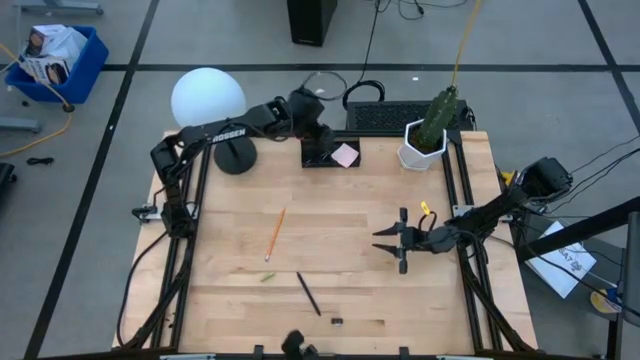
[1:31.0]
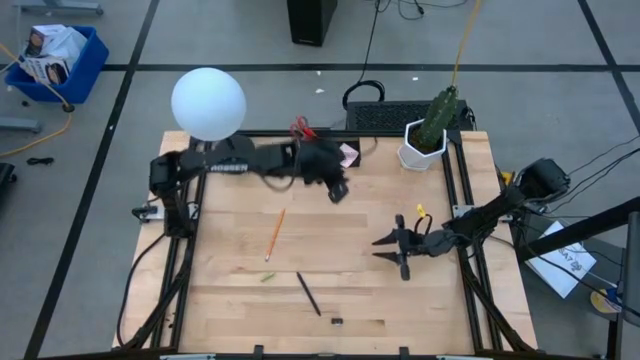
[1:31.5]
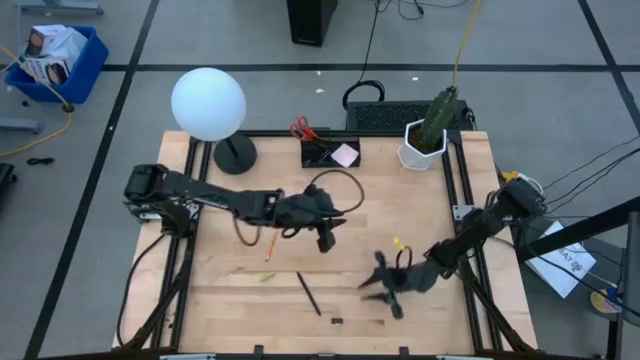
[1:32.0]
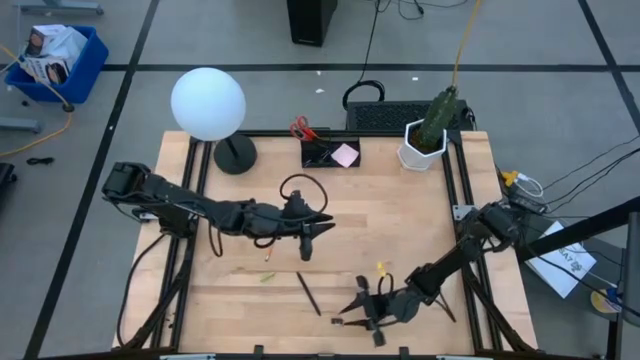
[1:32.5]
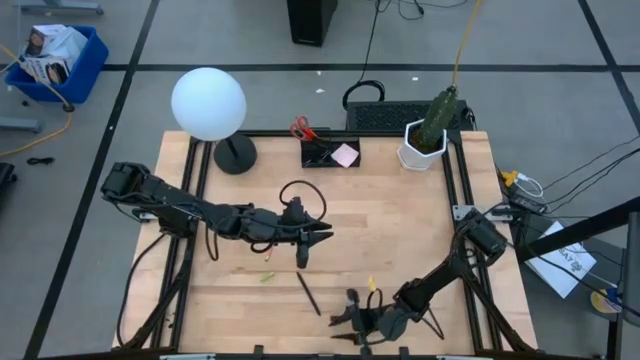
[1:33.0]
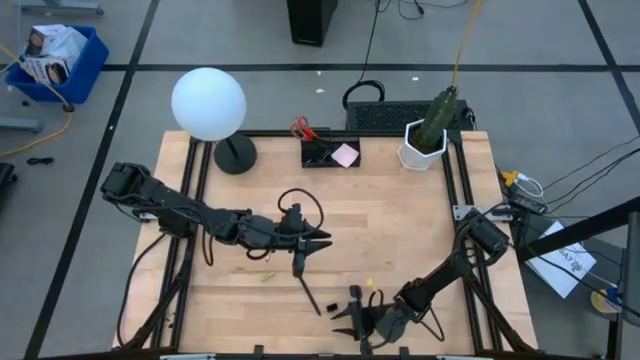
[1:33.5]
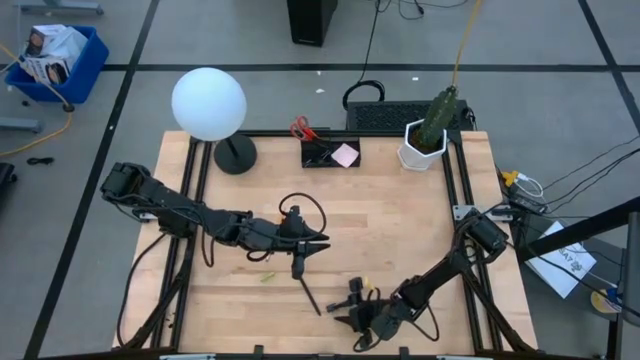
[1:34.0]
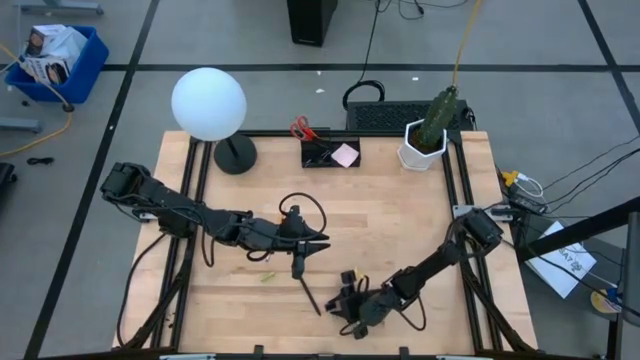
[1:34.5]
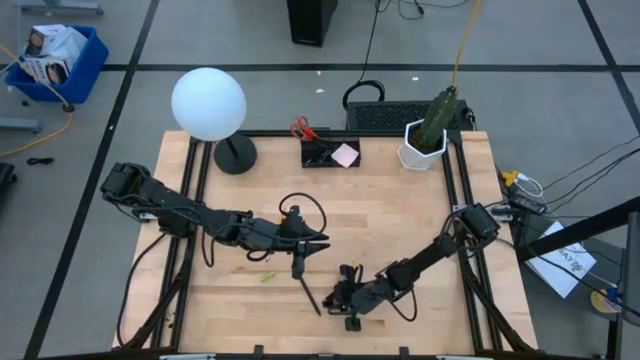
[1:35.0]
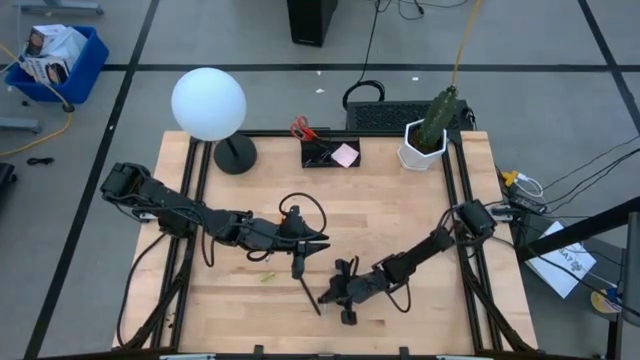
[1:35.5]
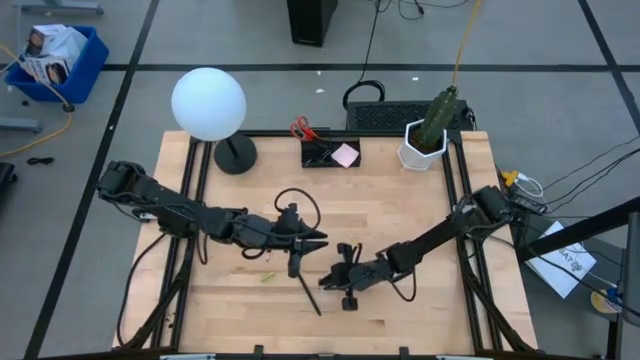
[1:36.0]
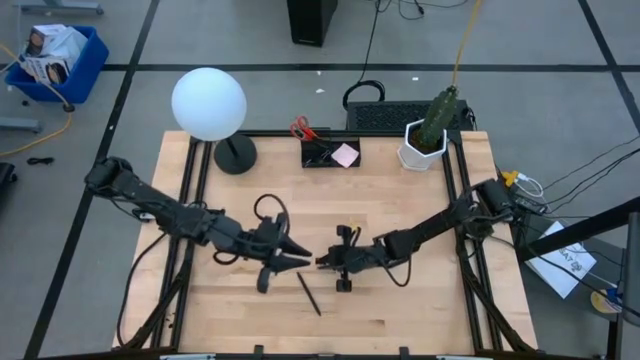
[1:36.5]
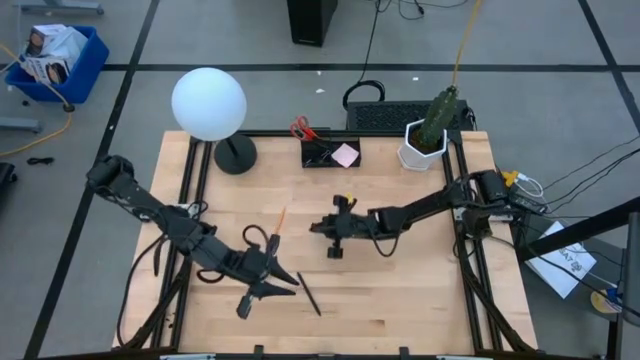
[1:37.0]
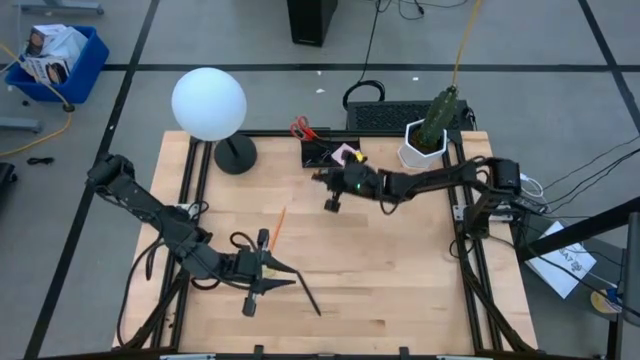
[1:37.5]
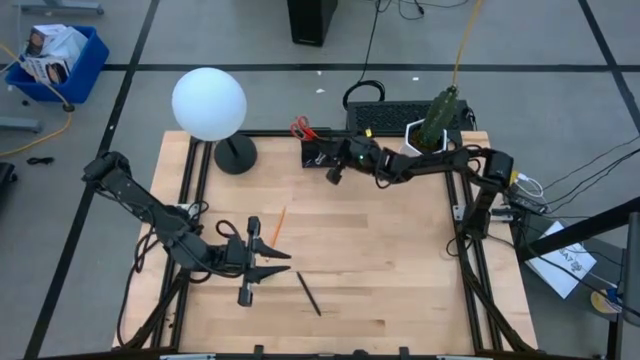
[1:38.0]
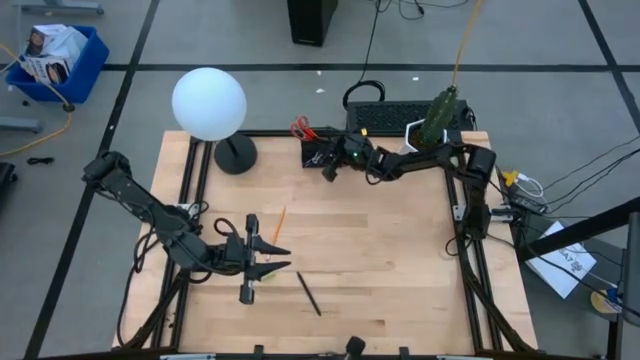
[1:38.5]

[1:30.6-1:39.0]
Task: Pick and place office supplies into organizer
Put the binder clip into the desk organizer

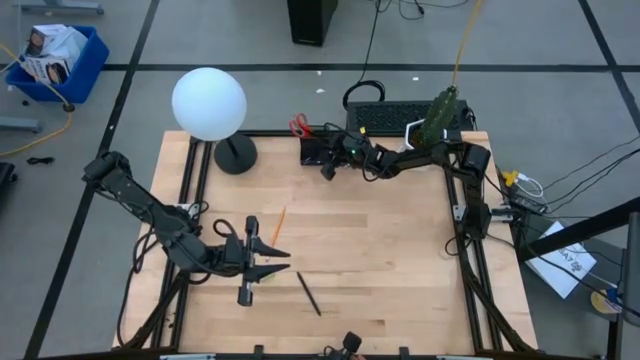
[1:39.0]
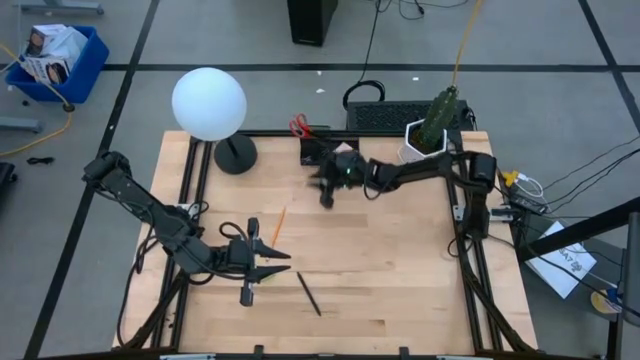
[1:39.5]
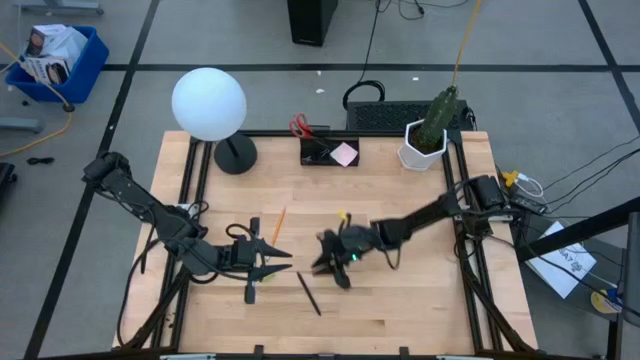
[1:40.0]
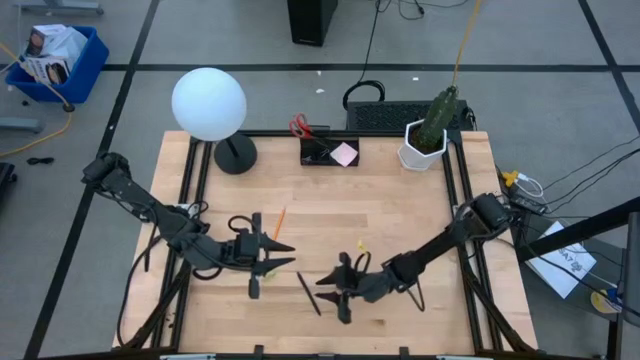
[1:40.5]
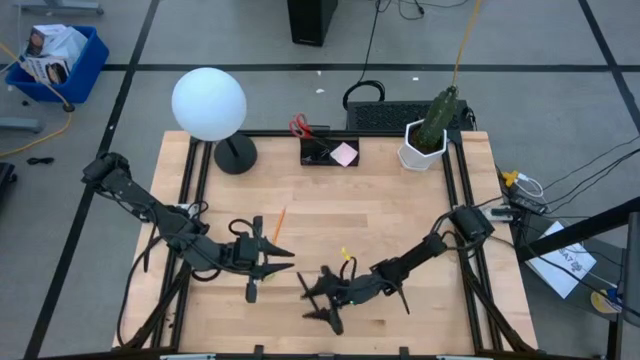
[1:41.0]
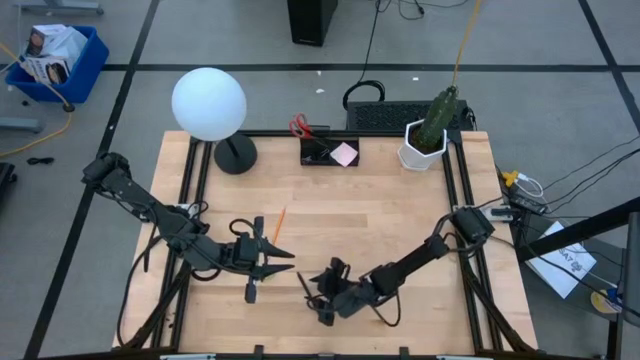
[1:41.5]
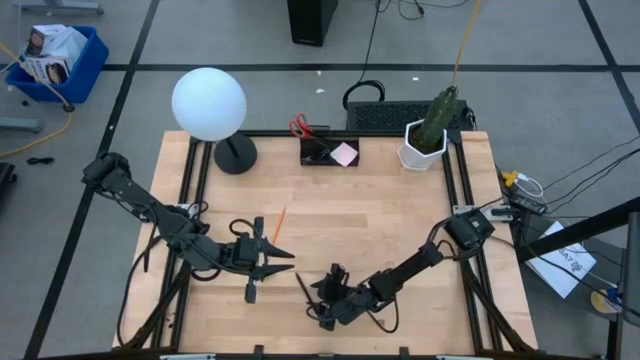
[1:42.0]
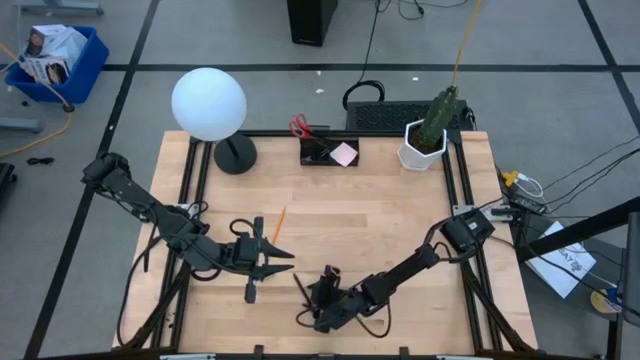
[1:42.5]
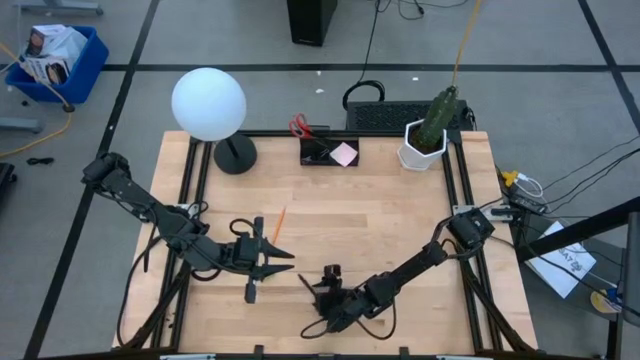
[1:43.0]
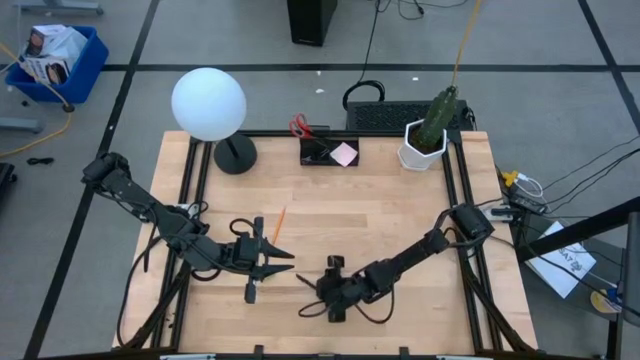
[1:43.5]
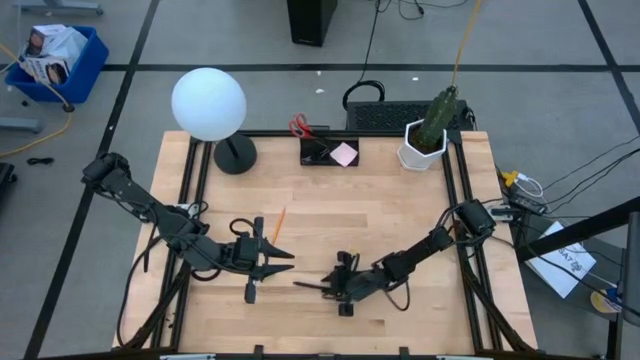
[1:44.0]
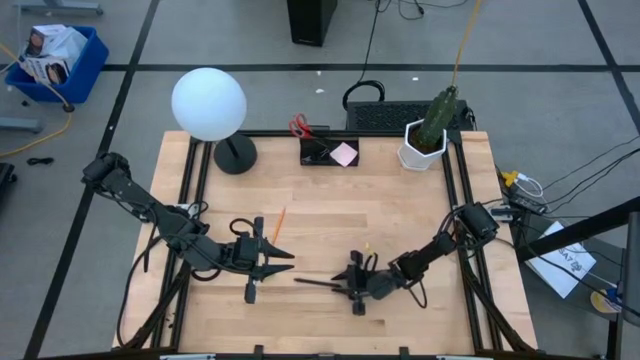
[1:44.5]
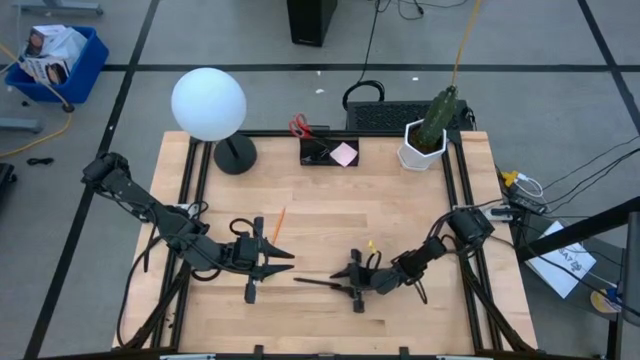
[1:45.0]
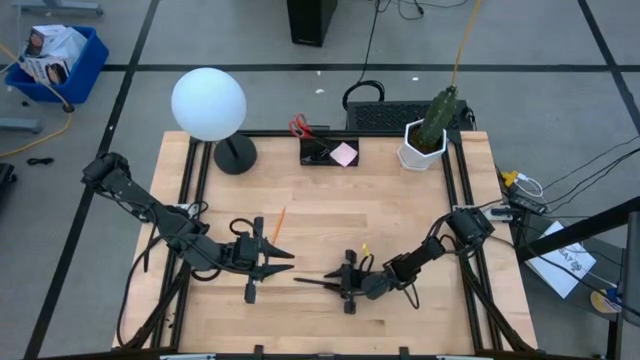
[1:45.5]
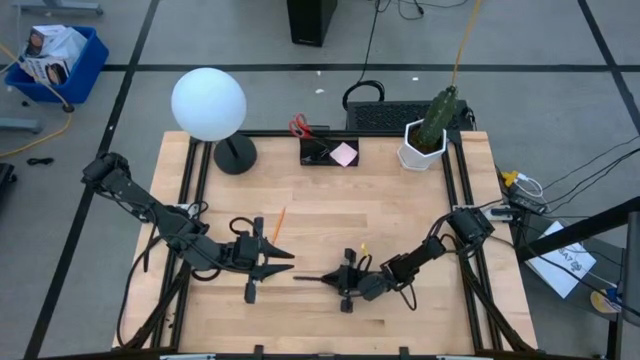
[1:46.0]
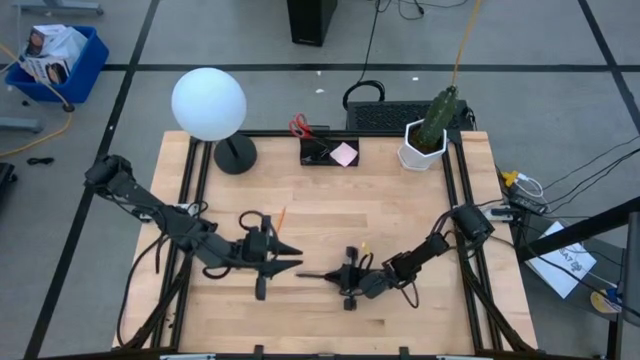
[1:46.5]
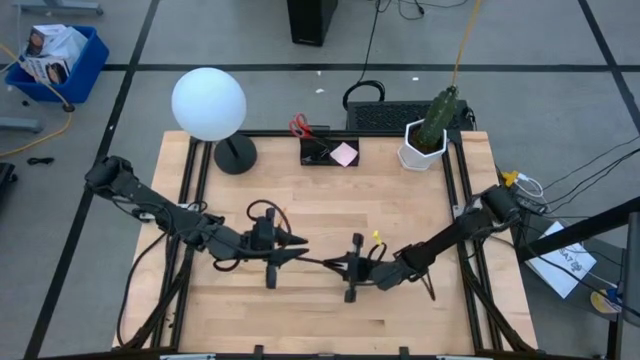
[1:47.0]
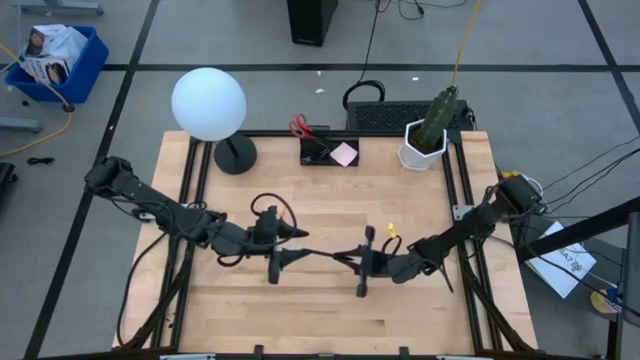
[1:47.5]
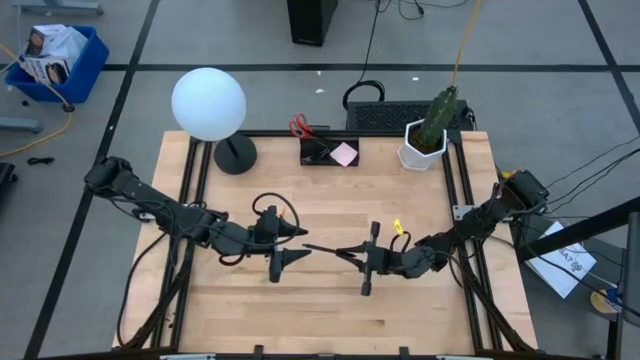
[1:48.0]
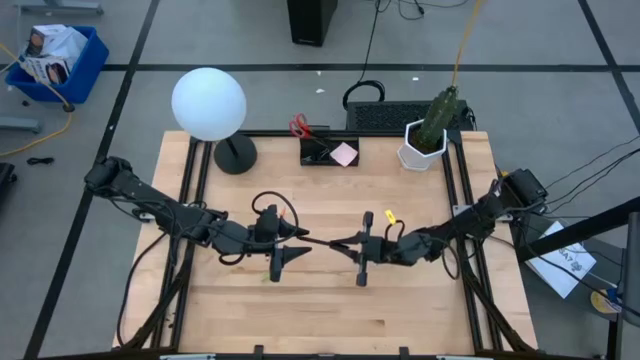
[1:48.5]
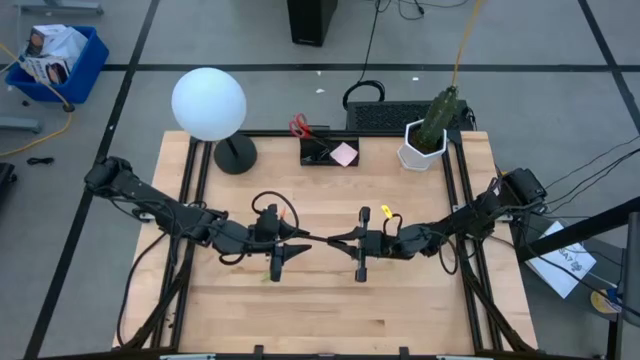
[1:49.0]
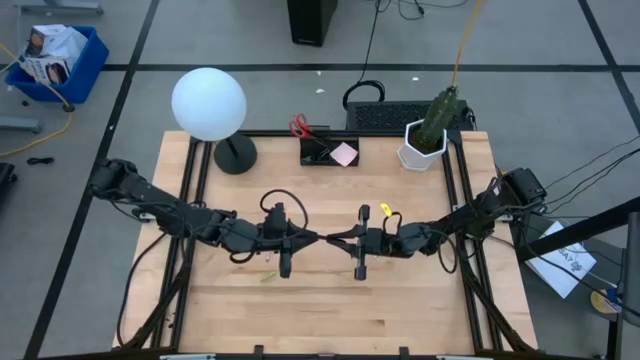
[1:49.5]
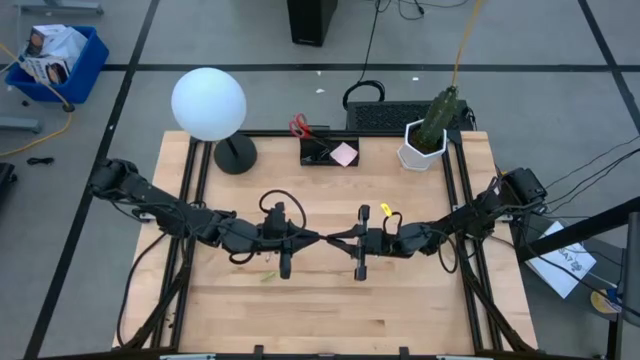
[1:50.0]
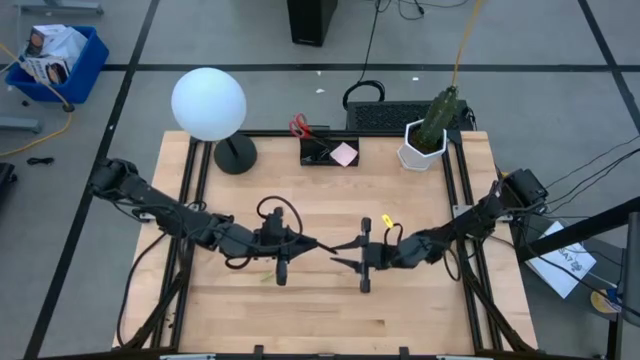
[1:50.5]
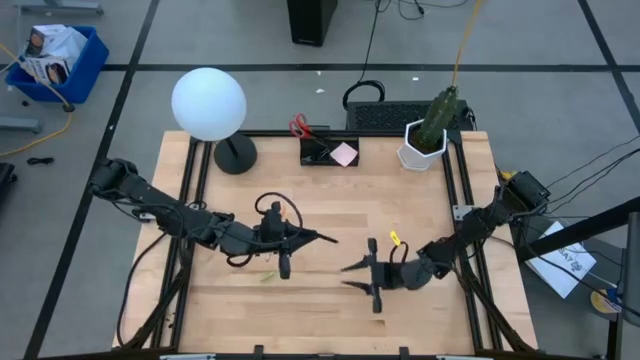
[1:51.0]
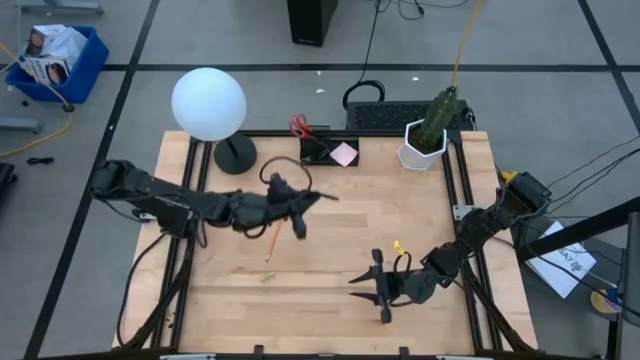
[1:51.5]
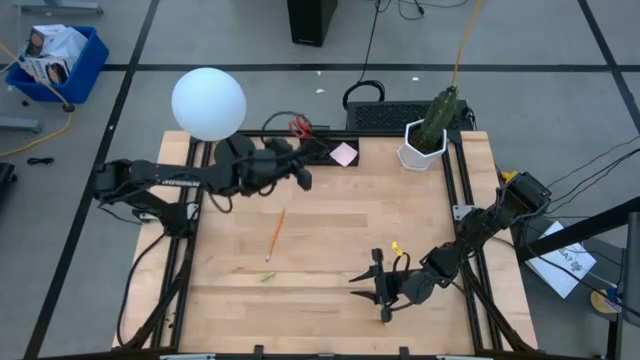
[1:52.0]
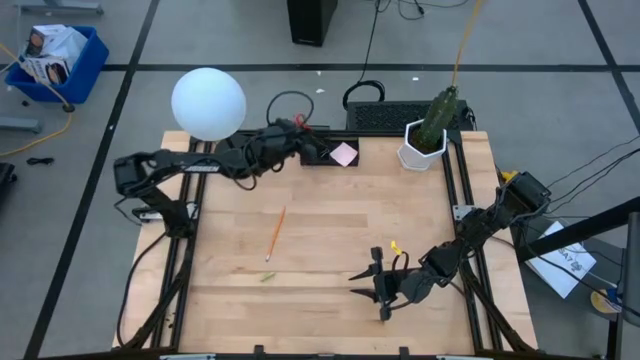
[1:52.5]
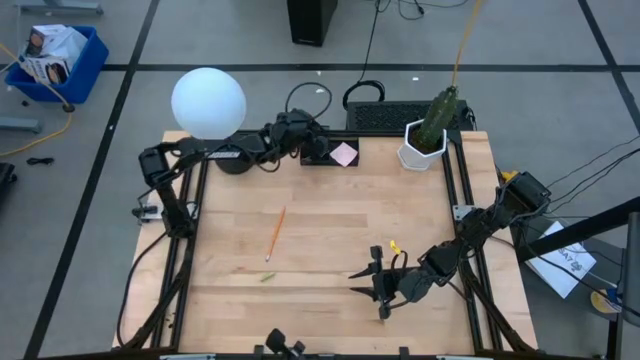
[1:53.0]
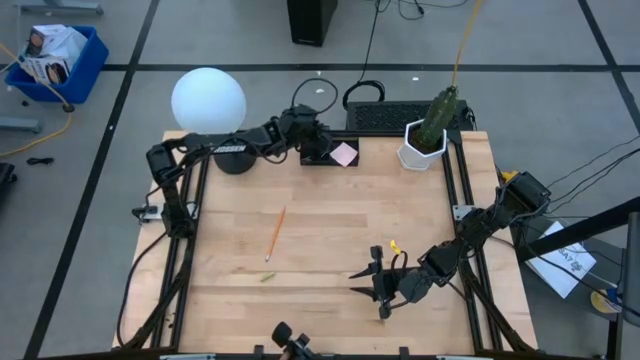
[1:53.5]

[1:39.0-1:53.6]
Put the black pen into the desk organizer
